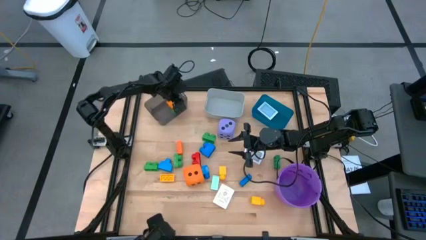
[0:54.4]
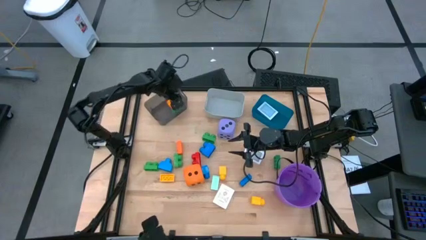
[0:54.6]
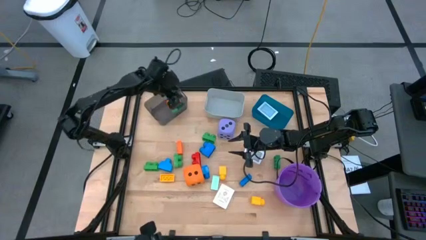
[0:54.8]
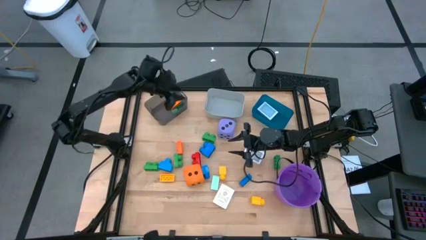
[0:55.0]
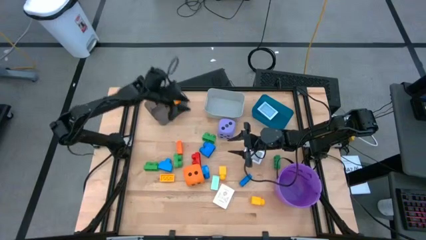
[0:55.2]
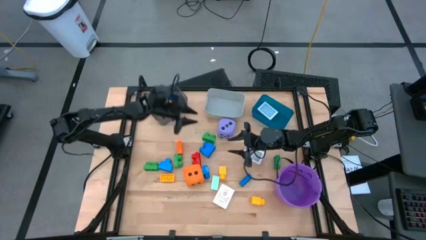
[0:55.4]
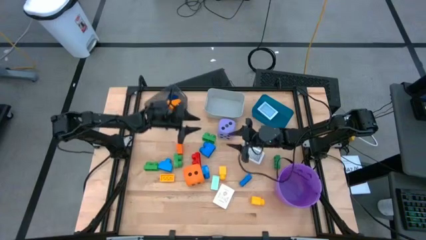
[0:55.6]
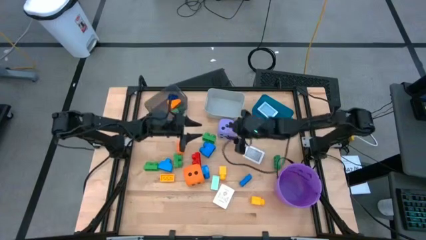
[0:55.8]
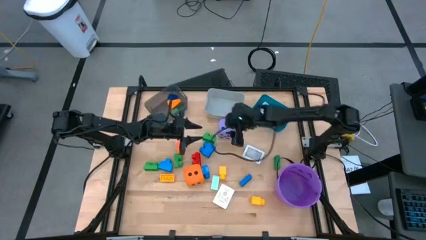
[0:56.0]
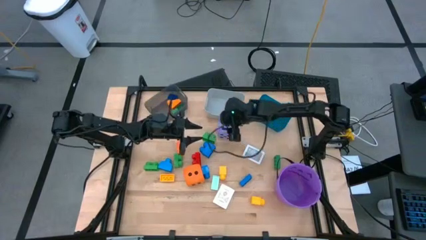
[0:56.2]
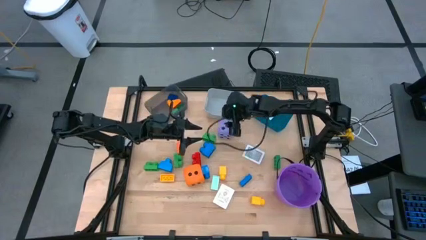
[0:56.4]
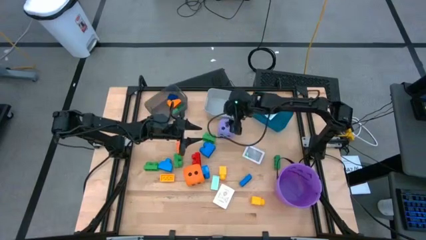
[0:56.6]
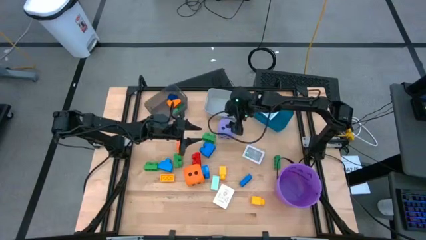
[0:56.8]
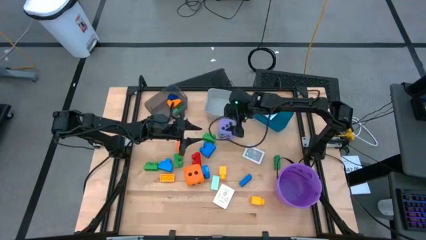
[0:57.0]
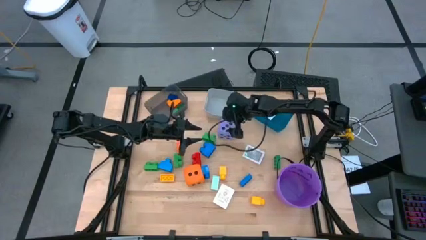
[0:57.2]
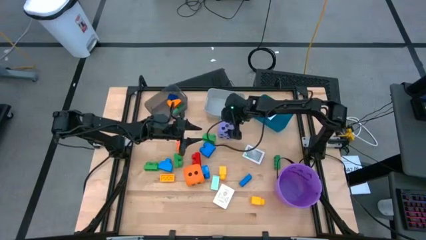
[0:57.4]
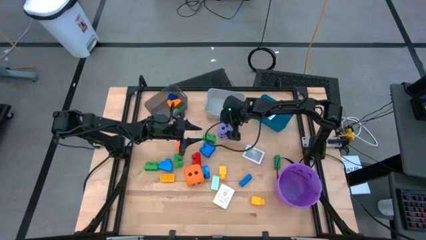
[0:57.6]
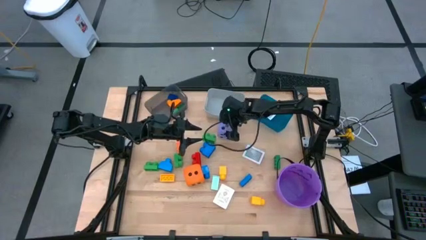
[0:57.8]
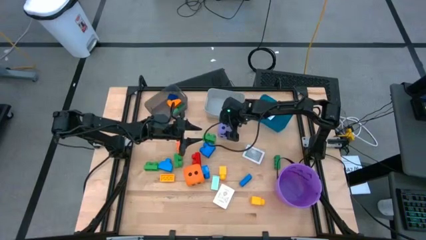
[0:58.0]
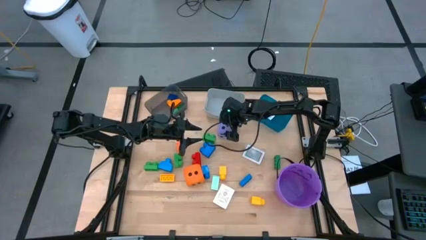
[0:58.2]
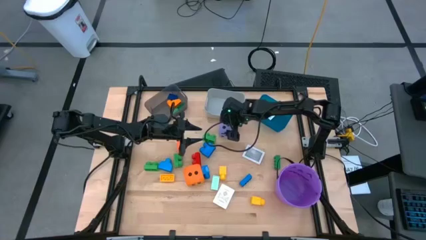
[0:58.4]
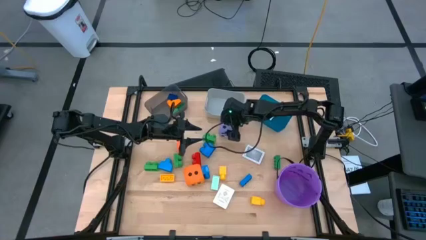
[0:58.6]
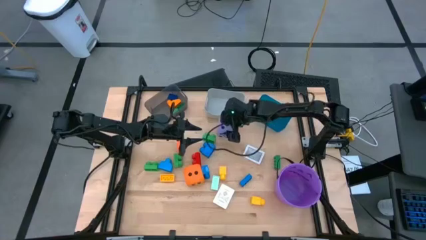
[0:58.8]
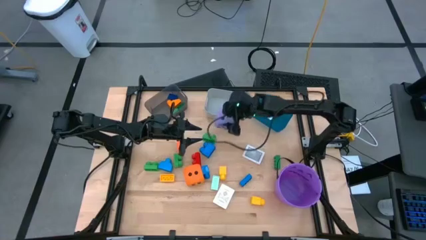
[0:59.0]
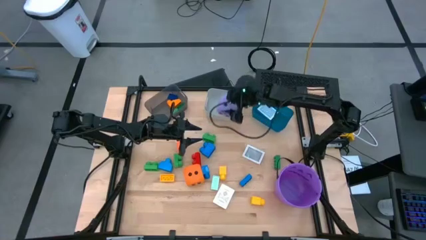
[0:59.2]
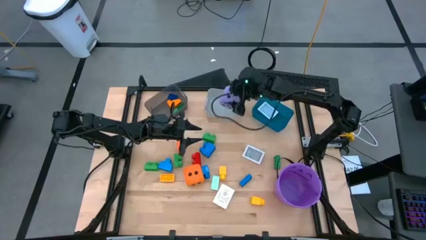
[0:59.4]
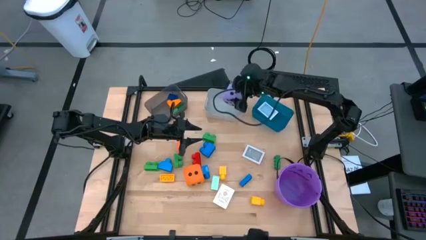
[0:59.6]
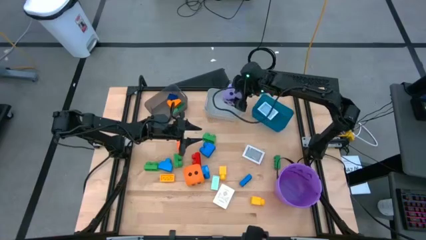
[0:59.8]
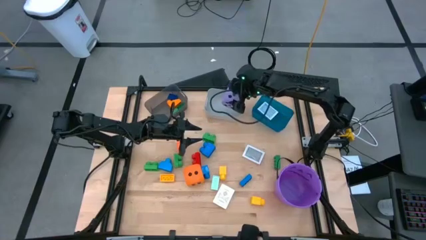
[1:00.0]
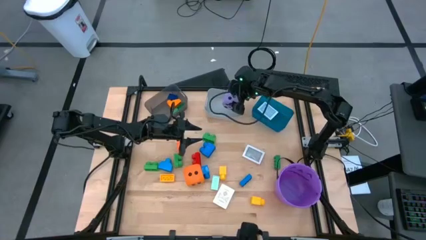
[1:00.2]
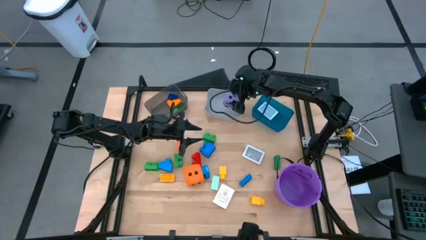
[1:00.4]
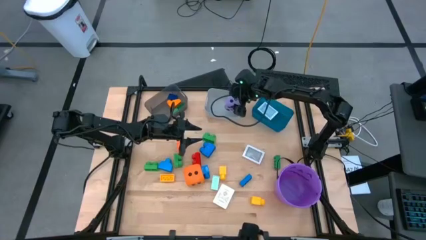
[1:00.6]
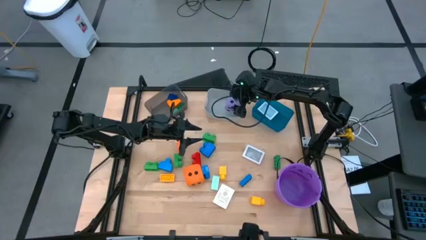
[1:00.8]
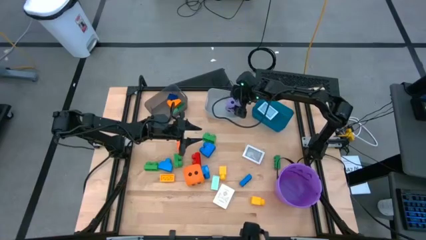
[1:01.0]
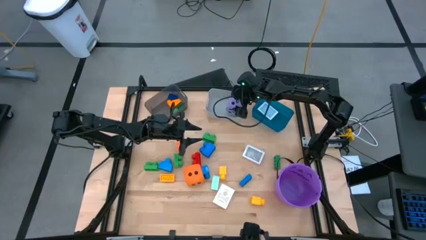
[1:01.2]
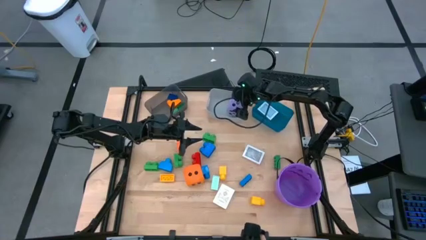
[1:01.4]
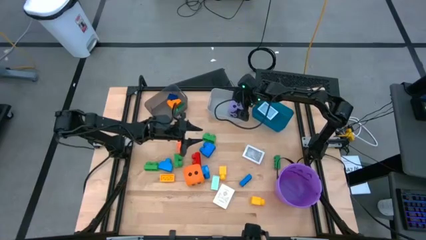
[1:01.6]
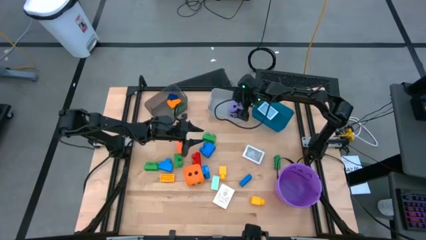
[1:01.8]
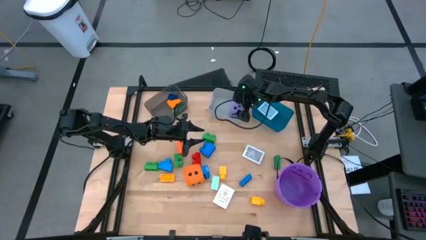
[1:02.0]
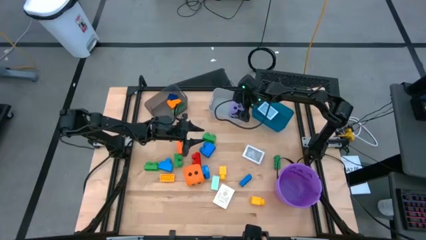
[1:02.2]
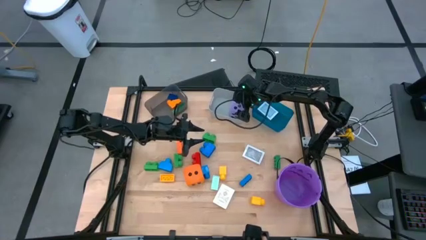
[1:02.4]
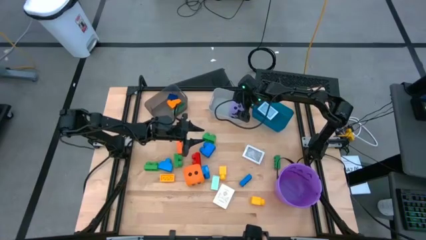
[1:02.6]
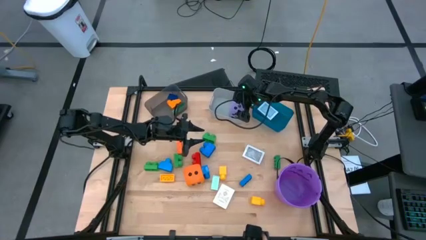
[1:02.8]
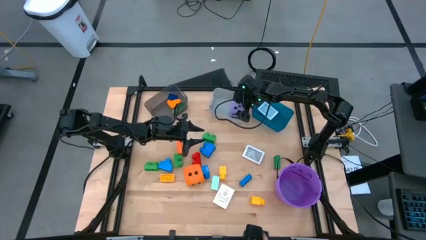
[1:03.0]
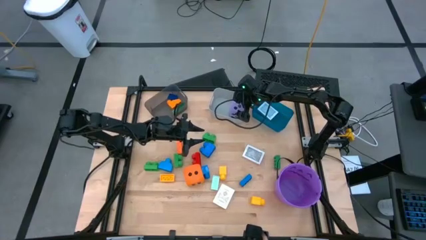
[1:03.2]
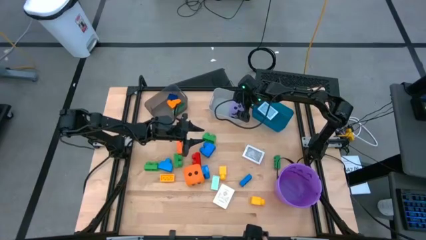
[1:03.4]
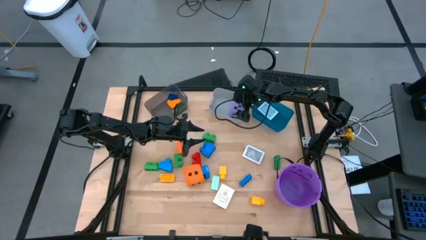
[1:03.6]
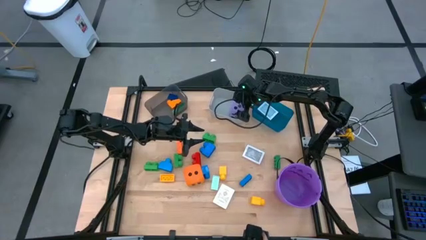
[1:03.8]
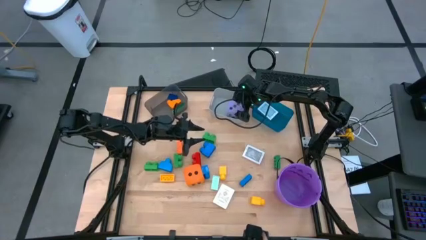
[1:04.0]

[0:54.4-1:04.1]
Task: Pick & Place Toys
Put the purple dice into the gray bin

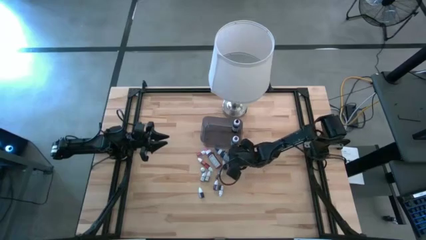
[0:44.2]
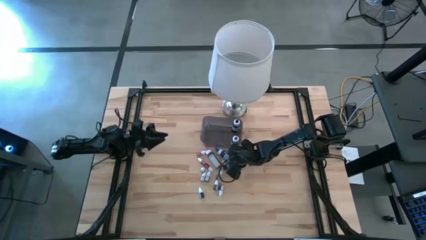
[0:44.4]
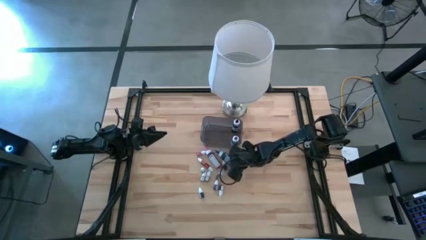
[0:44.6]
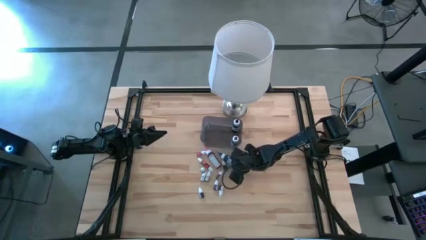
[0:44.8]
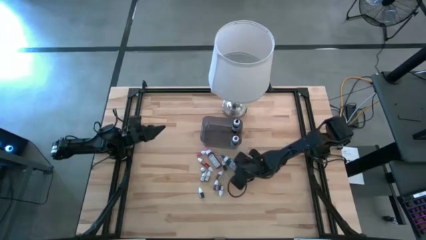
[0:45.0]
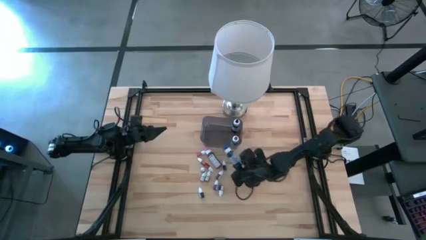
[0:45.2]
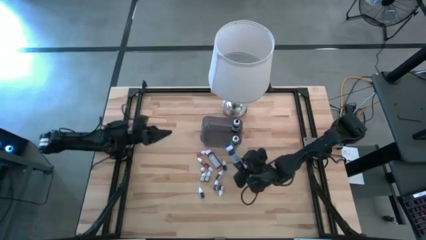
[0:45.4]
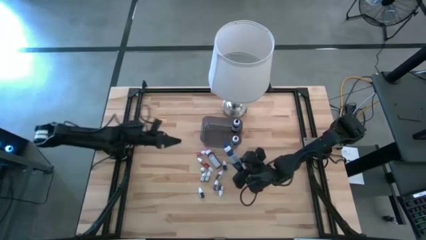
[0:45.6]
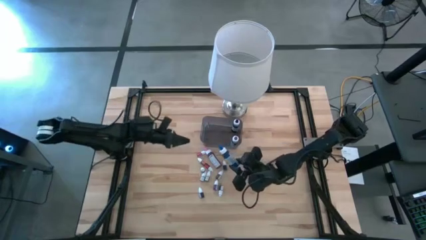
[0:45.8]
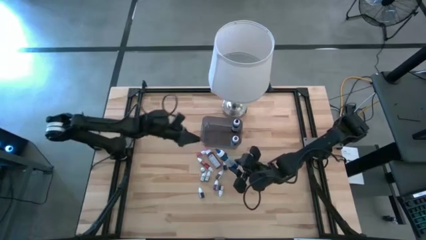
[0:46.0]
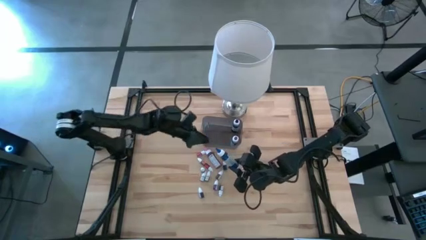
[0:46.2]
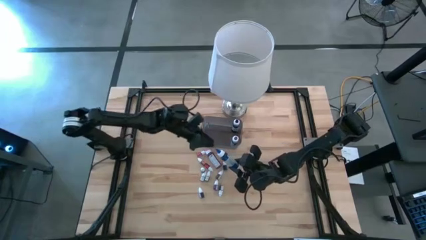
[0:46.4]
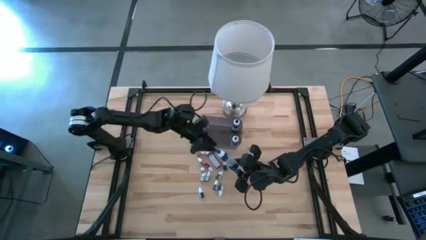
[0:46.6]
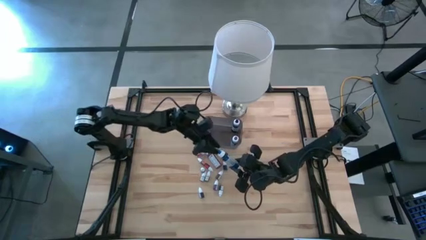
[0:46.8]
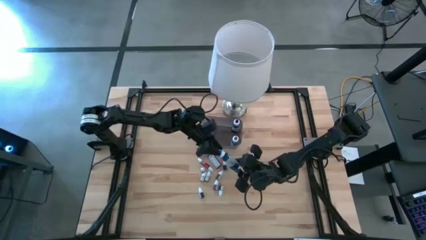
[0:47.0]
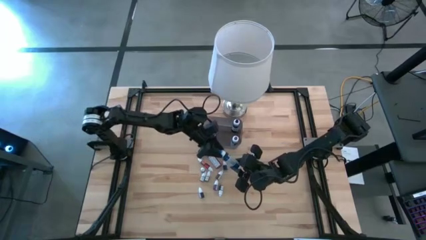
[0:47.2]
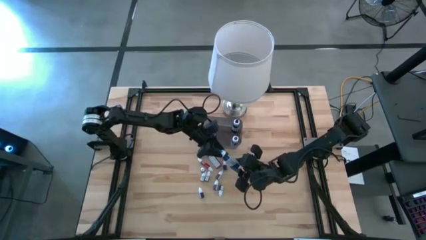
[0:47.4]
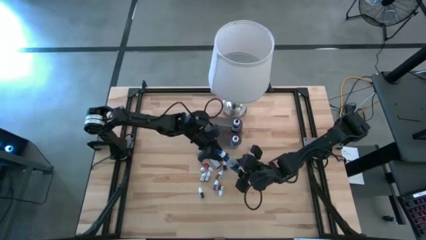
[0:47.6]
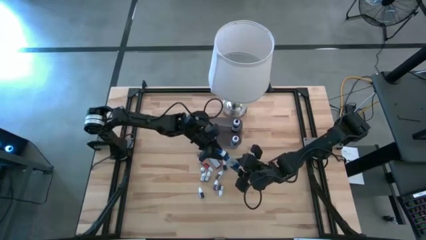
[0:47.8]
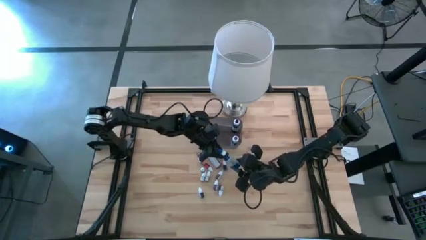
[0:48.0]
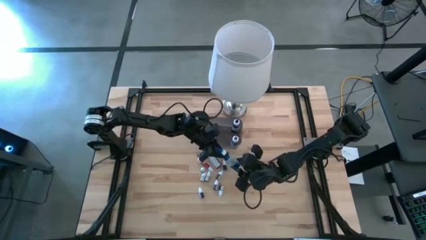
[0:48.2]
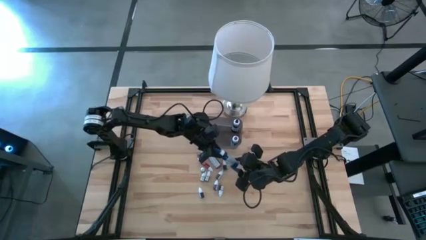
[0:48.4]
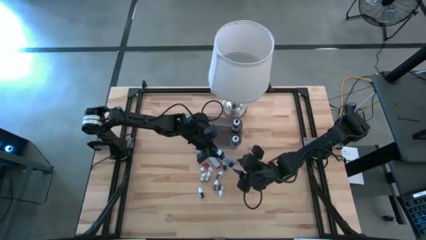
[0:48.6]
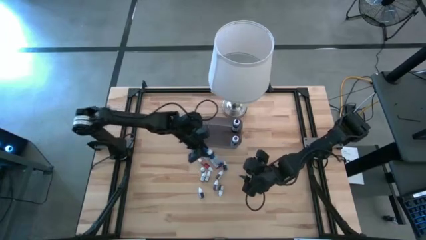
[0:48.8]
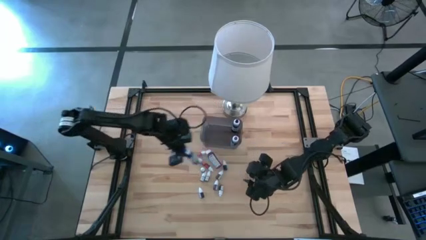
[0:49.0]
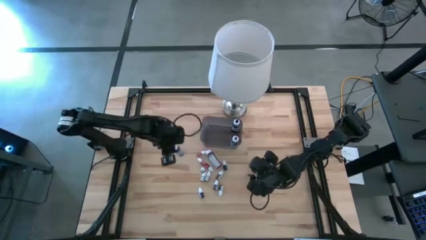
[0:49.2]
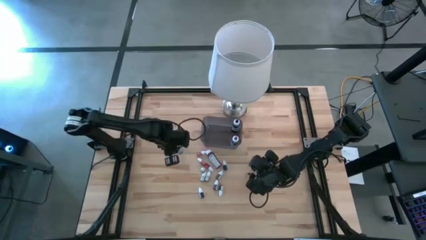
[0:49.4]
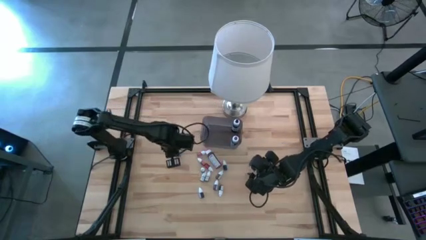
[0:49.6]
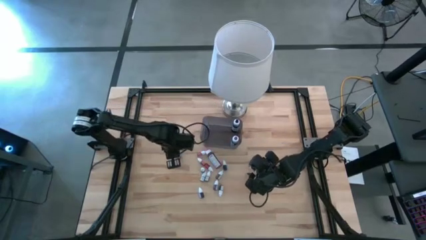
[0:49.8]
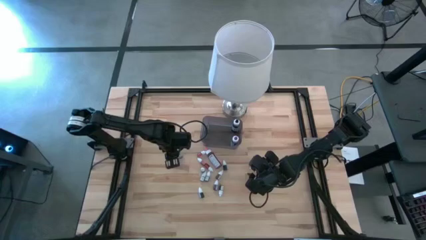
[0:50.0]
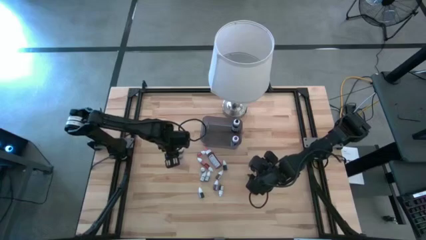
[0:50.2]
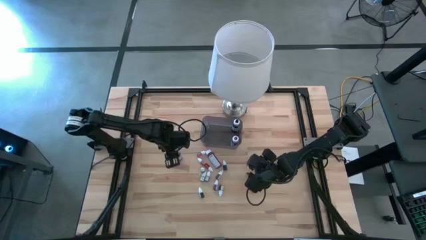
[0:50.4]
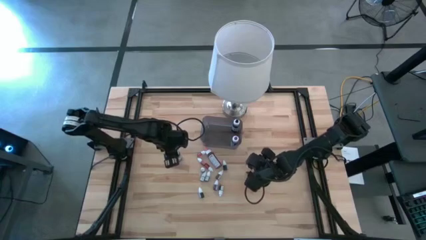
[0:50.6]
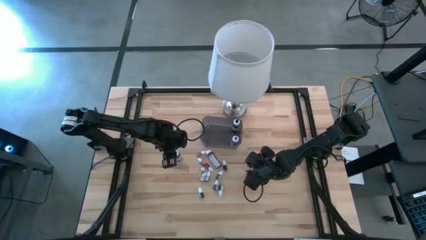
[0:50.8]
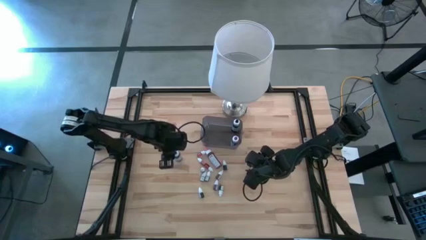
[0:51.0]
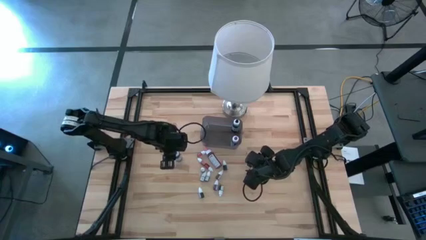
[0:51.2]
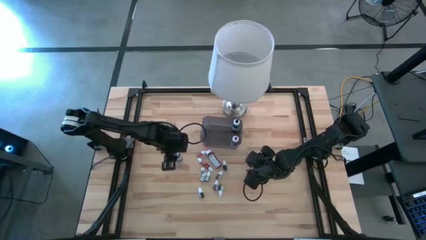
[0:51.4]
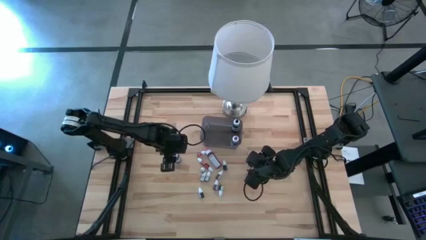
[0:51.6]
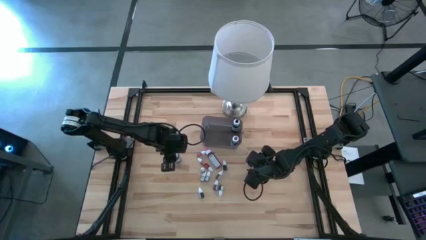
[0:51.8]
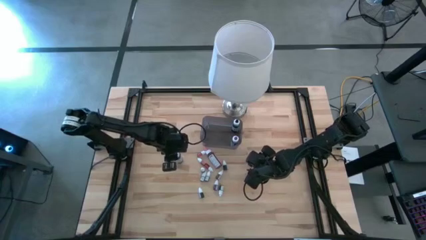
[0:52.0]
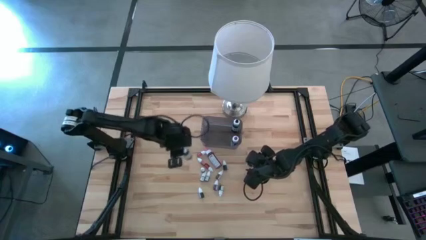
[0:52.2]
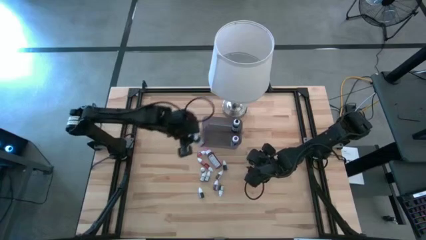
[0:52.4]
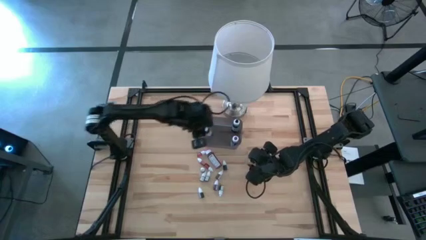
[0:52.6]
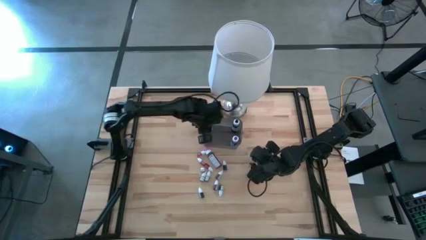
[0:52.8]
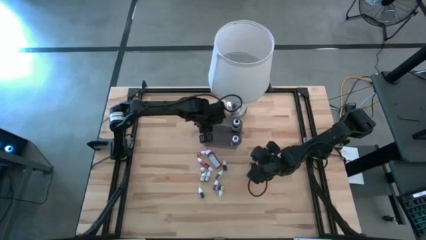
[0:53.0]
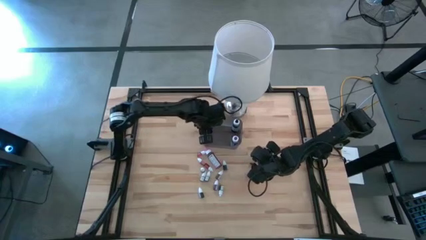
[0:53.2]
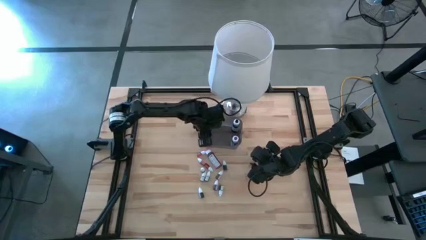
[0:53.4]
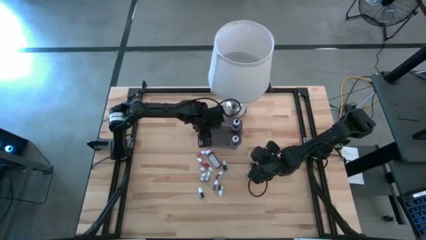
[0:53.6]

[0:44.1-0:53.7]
Task: Pick & Place food coloring
Put the big blue food coloring bottle into the black bin
